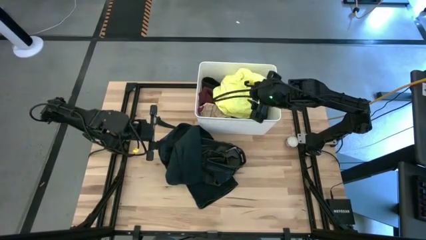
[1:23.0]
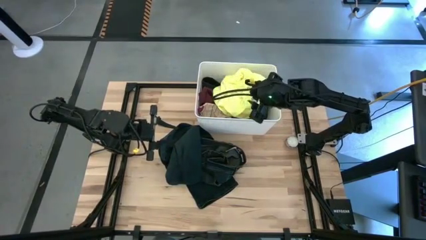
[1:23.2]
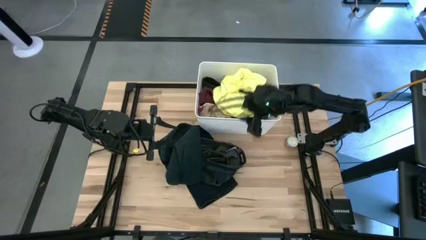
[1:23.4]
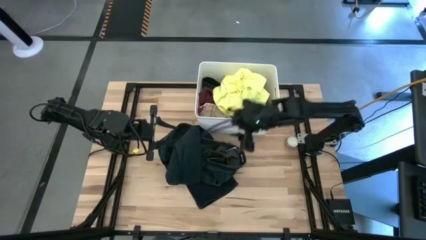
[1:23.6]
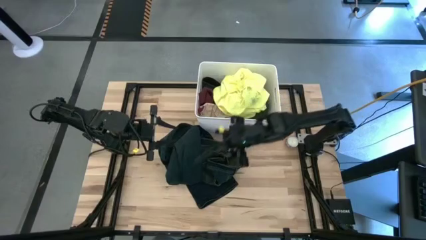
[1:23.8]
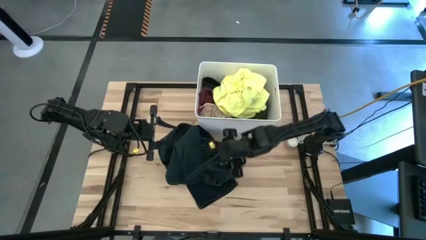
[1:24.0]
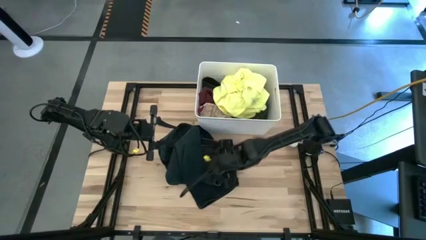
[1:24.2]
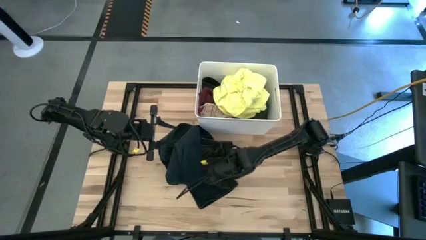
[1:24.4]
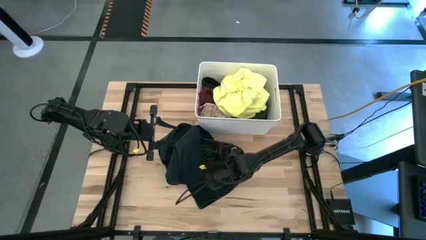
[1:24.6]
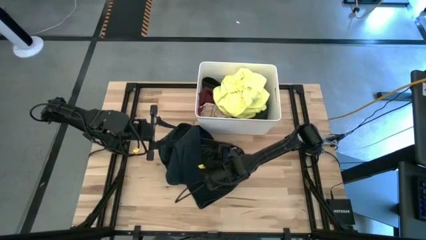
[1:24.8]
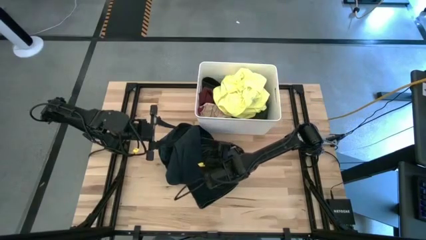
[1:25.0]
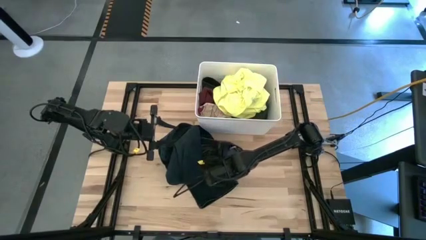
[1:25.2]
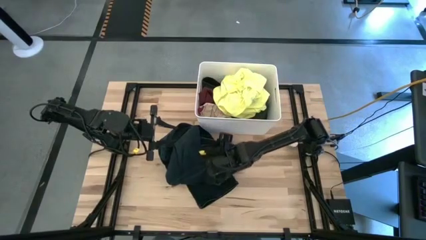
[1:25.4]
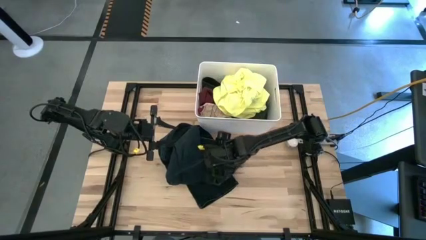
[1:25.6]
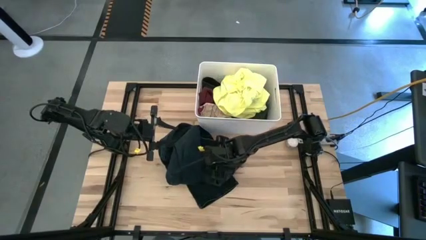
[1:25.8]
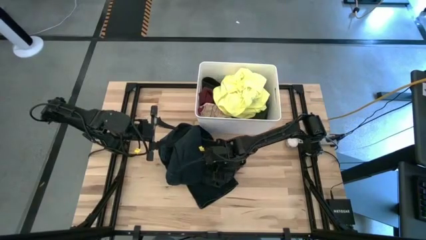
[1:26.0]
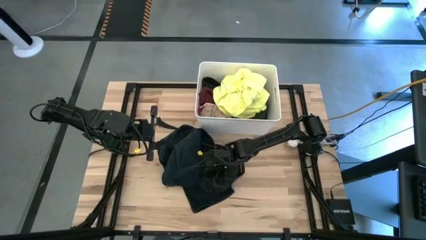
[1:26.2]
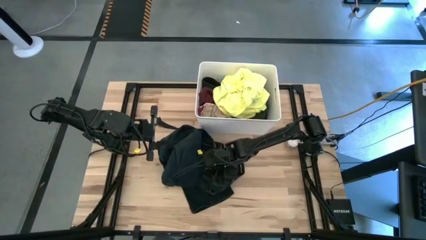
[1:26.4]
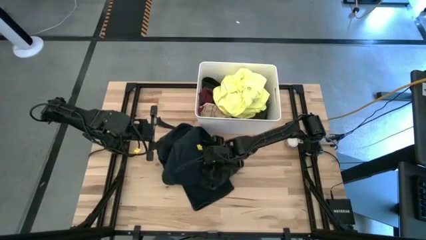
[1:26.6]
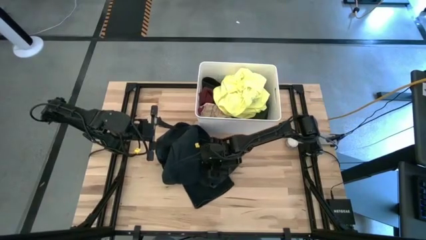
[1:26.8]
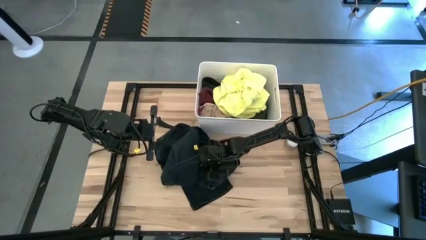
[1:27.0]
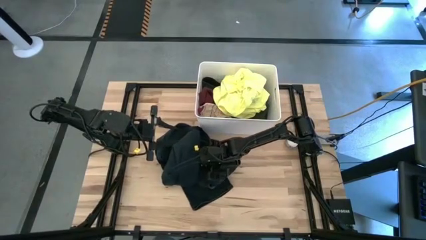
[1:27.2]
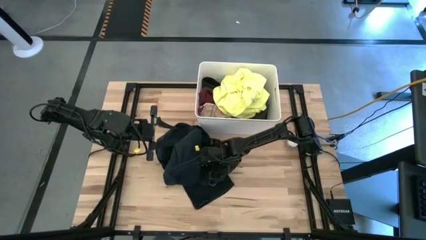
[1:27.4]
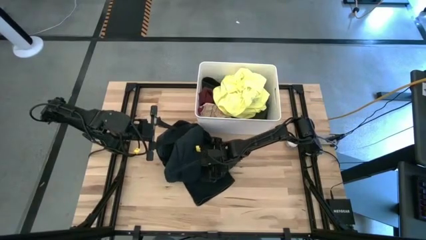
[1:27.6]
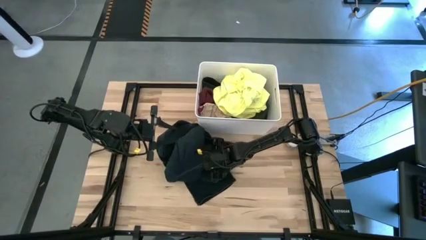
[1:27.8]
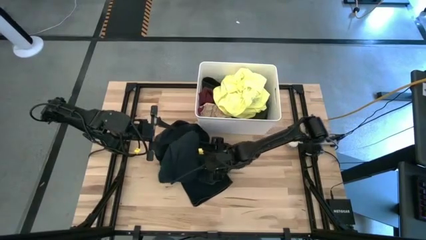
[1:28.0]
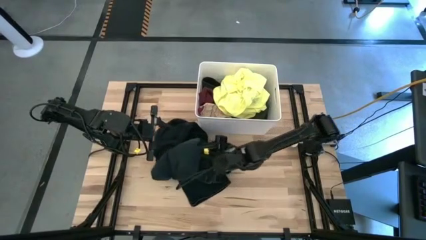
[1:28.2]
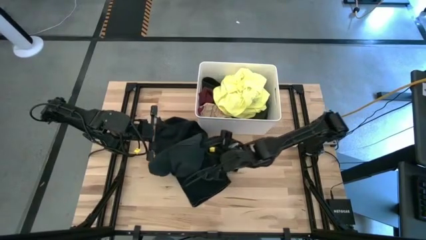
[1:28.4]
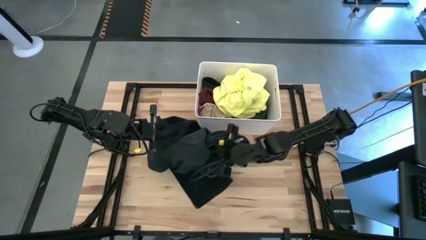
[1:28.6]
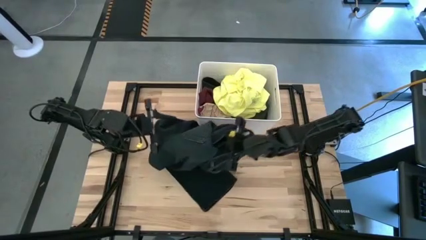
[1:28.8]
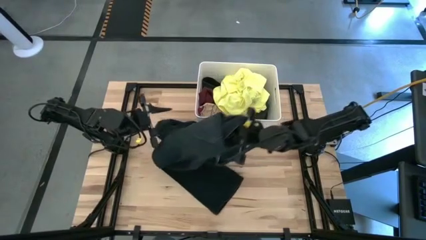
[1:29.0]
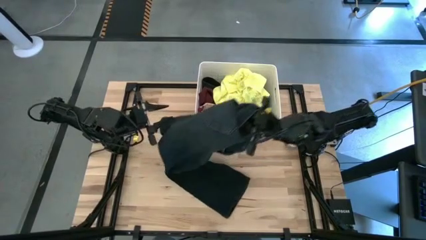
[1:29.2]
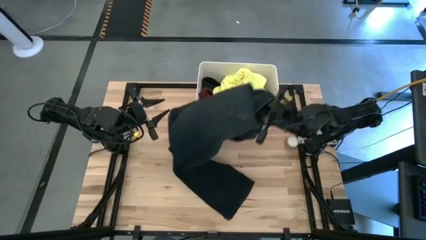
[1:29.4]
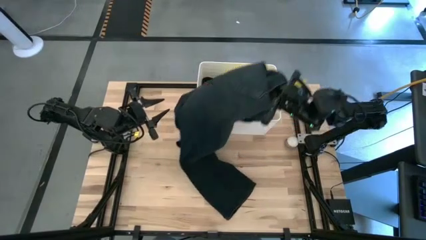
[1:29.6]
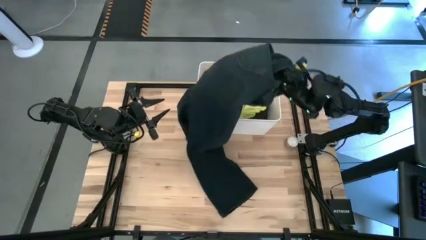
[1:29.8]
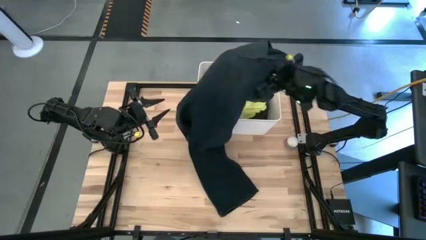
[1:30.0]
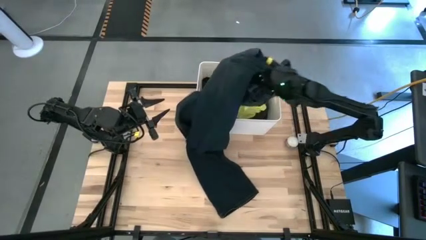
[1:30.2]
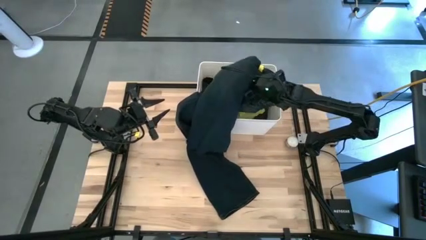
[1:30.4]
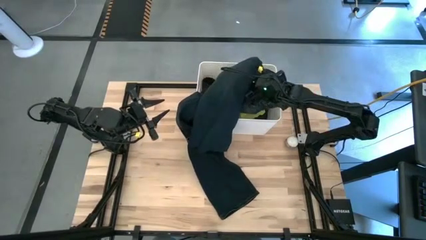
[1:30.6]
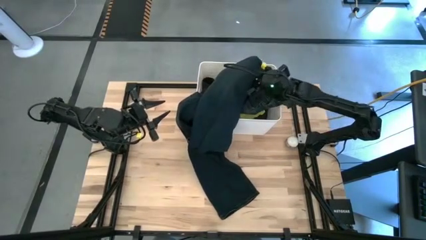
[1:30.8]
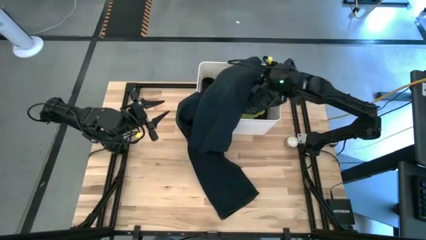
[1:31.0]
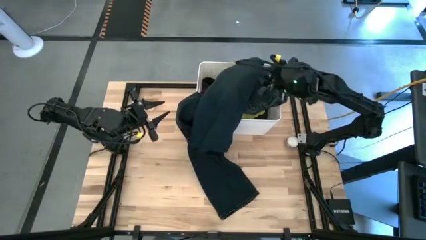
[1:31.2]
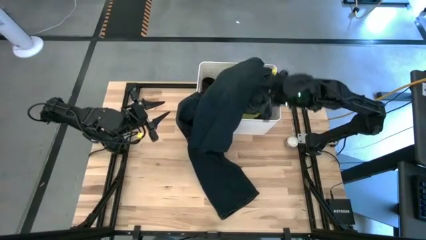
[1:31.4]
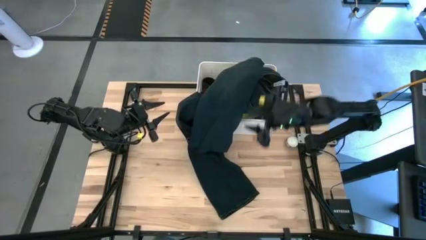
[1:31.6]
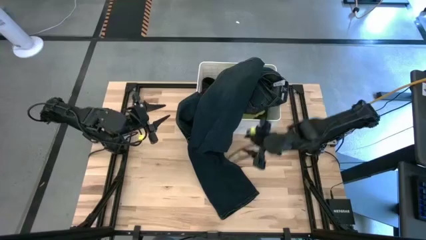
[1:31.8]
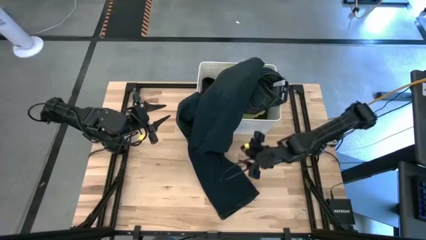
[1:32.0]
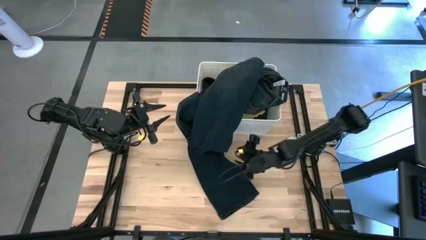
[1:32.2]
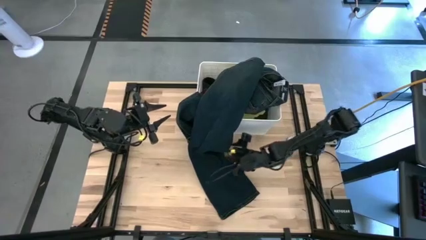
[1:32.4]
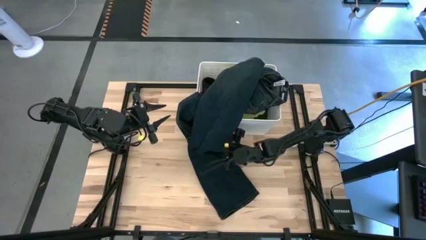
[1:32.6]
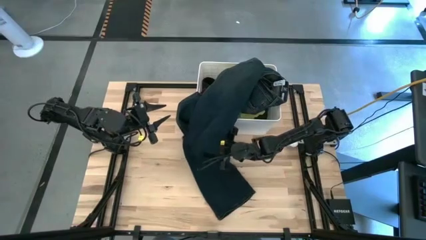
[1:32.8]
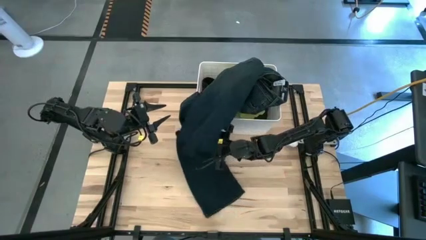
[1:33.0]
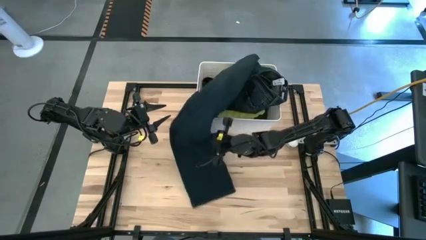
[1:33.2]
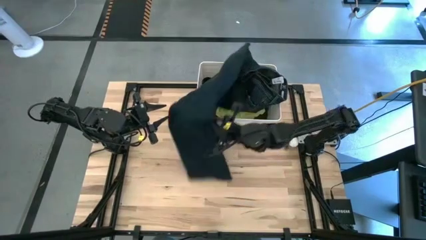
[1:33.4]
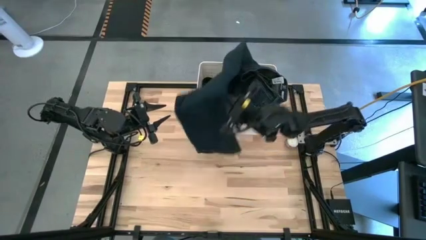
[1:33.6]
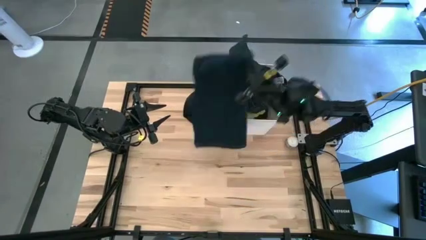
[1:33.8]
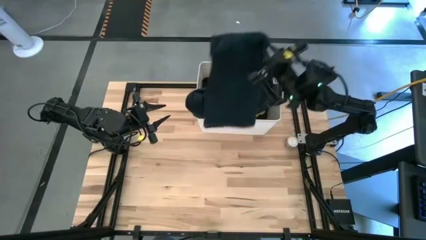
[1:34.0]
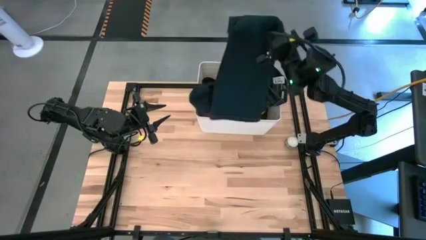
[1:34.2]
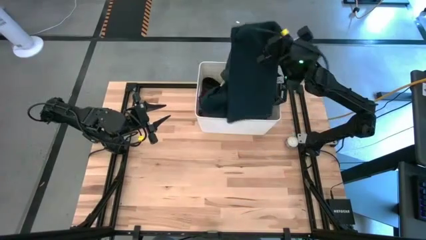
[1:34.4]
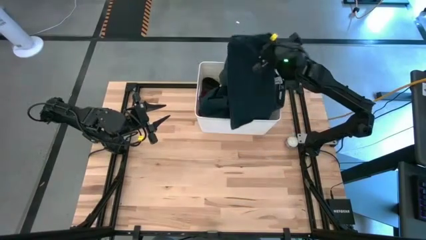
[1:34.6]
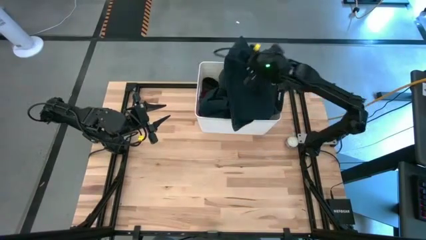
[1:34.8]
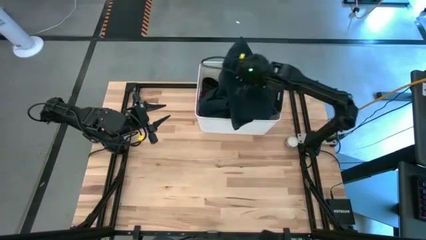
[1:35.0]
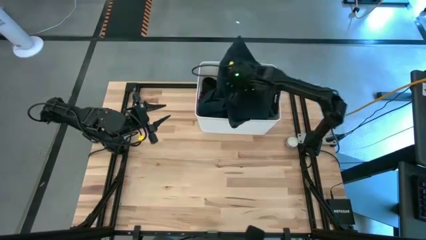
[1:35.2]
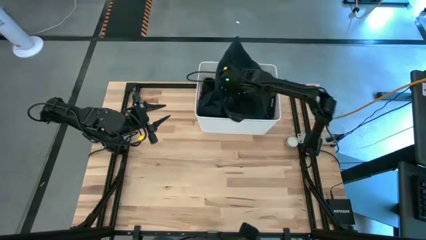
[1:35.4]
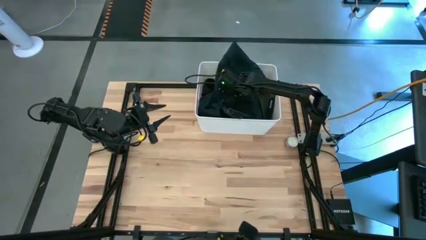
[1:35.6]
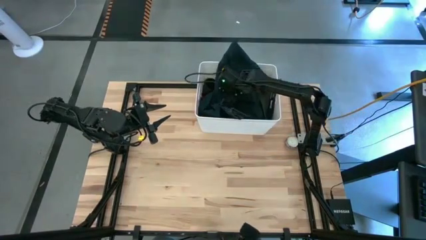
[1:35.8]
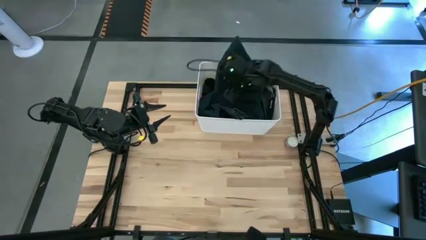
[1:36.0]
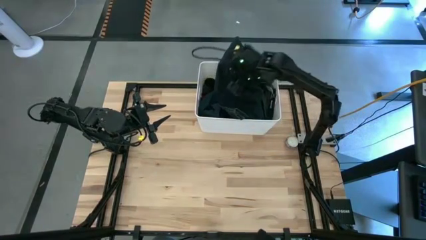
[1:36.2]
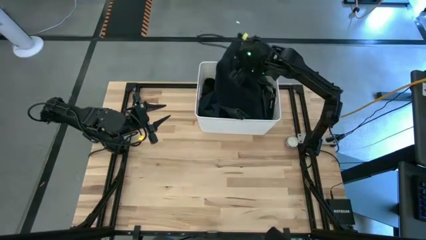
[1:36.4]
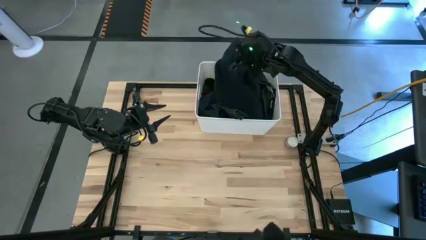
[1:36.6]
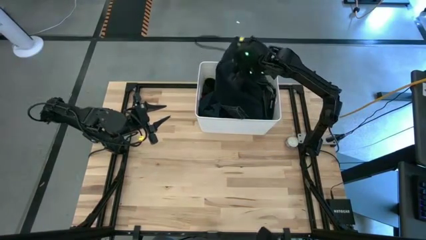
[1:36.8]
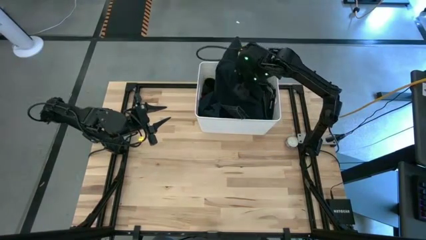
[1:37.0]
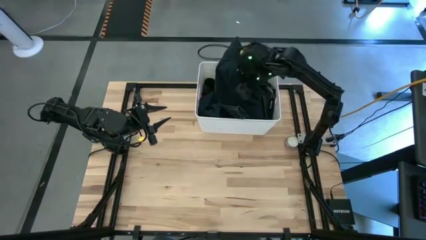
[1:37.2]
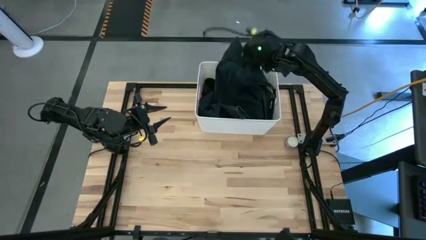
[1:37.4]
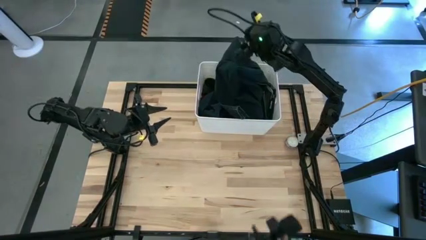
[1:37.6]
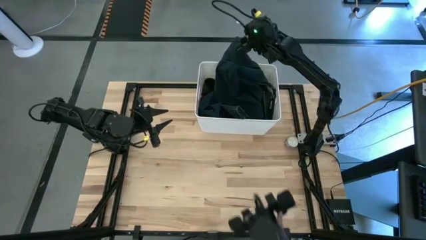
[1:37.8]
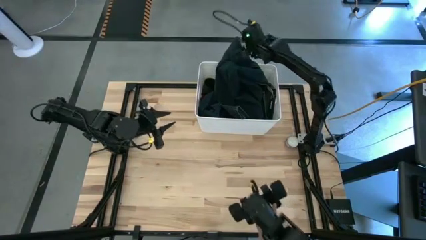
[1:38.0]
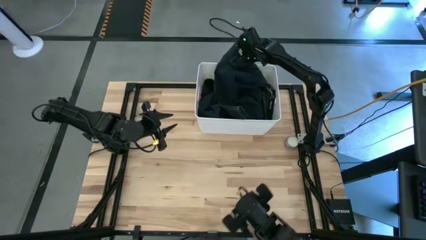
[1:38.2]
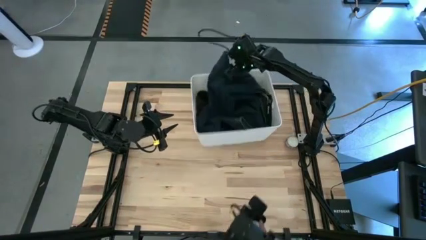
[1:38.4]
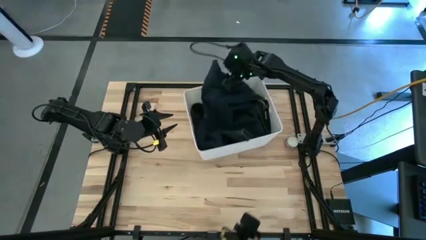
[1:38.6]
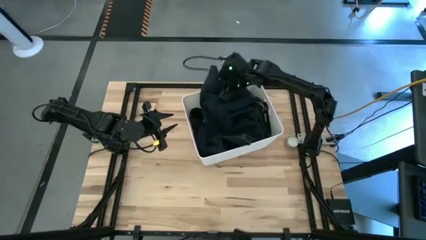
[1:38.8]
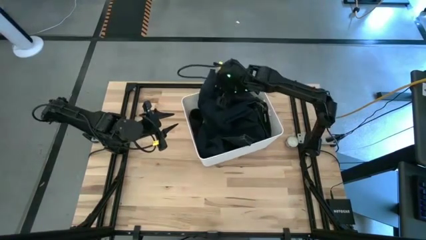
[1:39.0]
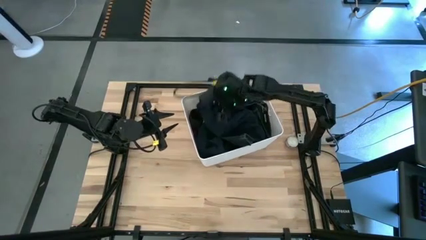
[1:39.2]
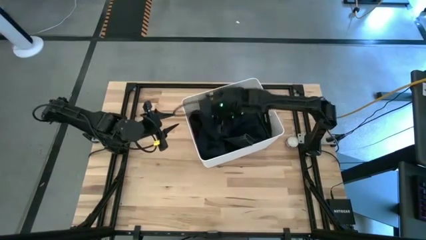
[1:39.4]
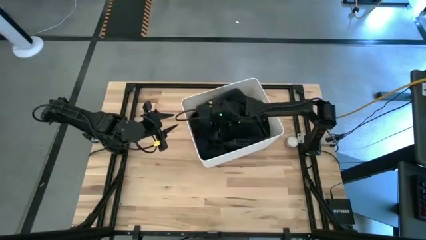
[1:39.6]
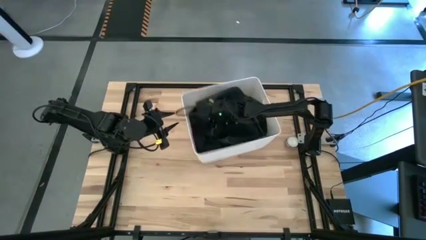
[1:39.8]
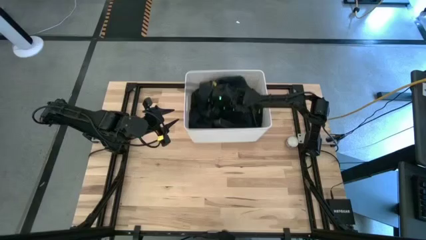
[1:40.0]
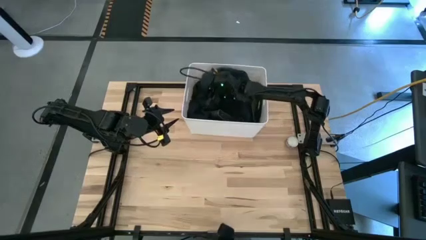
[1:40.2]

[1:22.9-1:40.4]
Task: Sort clothes
Put the black pants into the white laundry organizer
